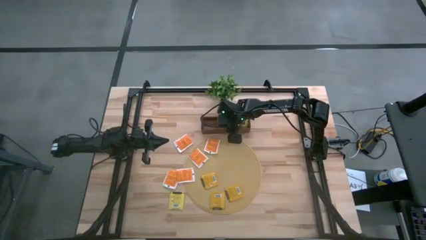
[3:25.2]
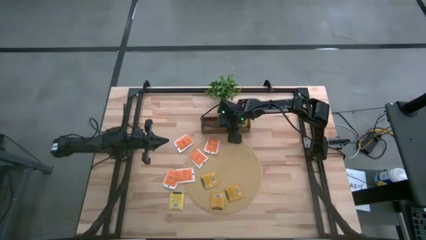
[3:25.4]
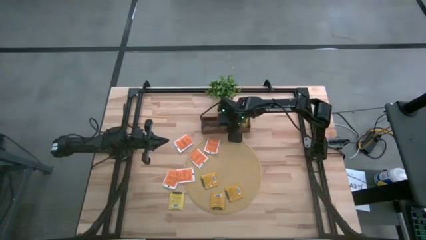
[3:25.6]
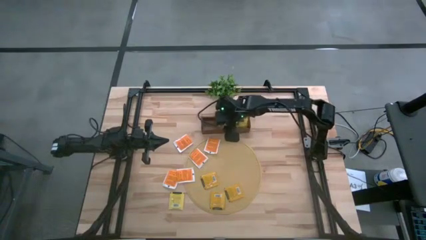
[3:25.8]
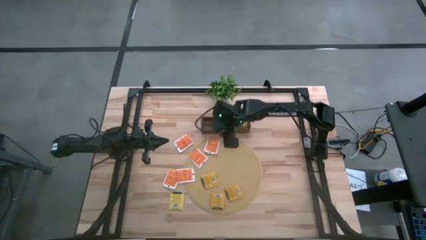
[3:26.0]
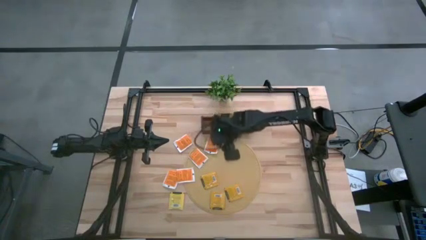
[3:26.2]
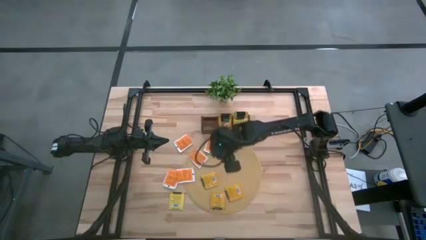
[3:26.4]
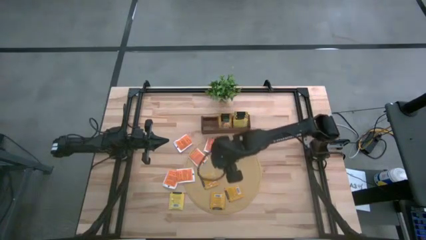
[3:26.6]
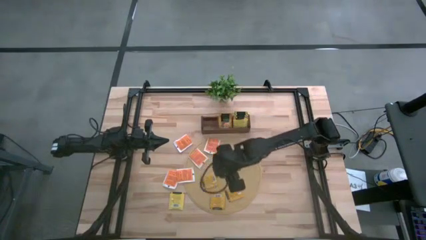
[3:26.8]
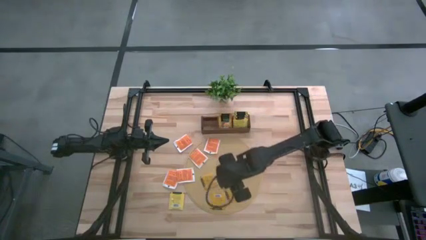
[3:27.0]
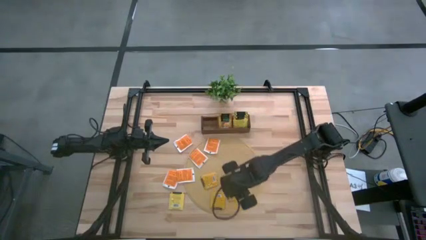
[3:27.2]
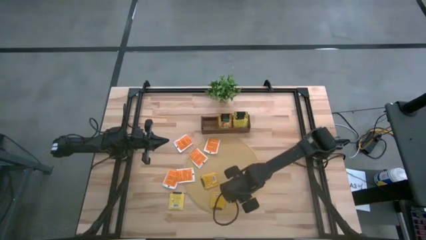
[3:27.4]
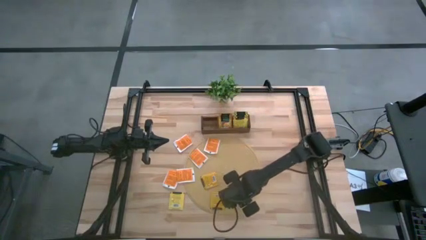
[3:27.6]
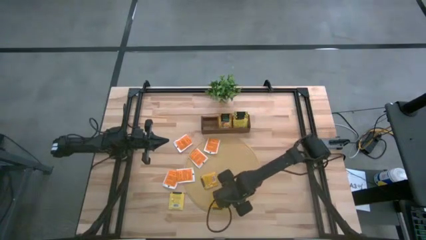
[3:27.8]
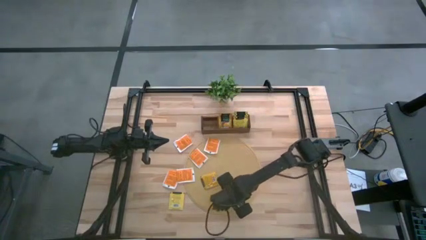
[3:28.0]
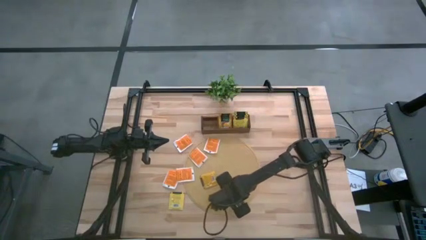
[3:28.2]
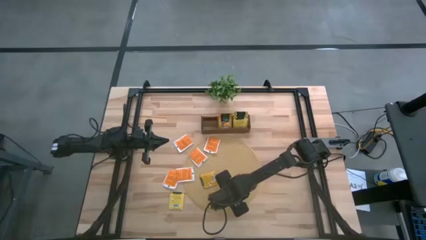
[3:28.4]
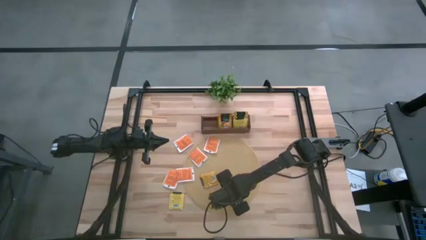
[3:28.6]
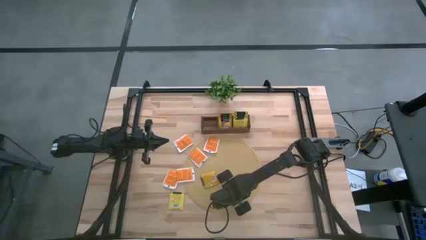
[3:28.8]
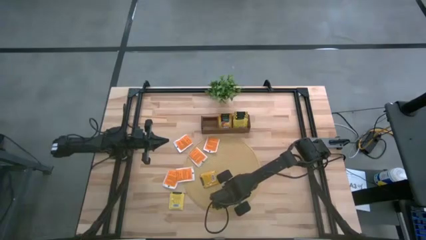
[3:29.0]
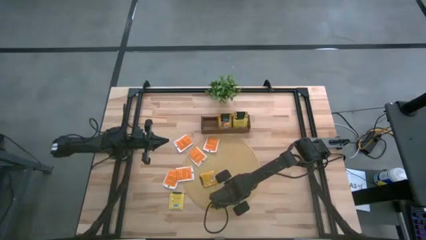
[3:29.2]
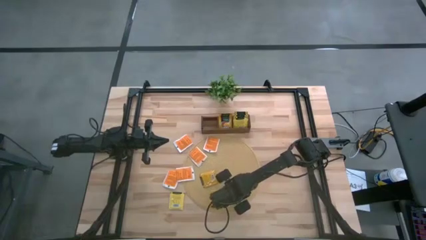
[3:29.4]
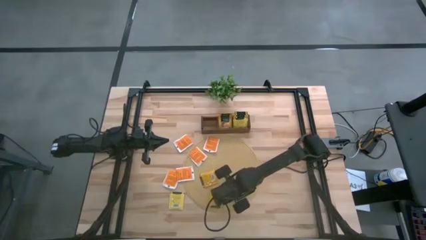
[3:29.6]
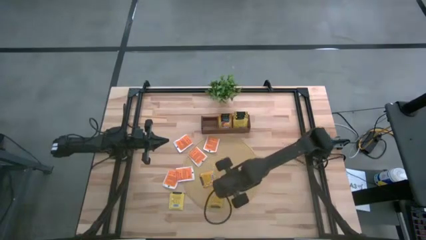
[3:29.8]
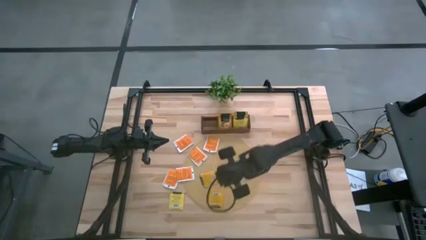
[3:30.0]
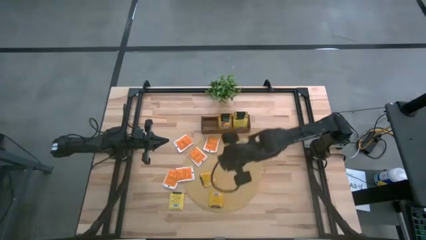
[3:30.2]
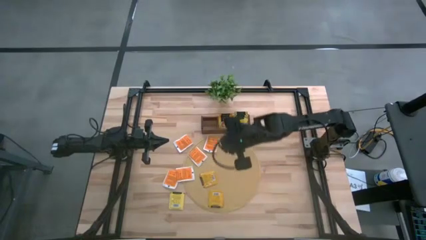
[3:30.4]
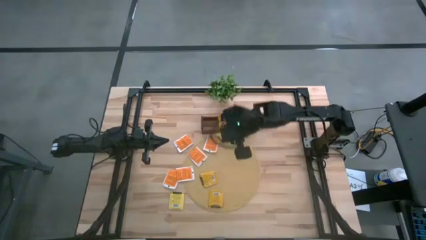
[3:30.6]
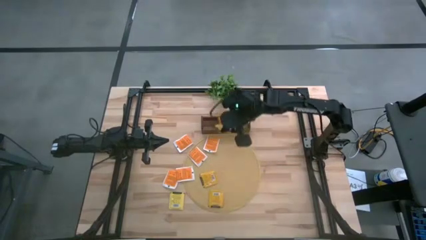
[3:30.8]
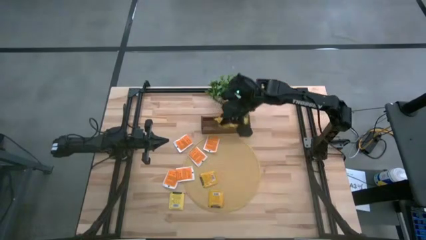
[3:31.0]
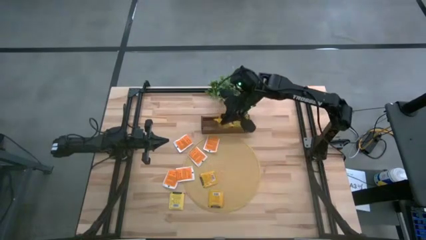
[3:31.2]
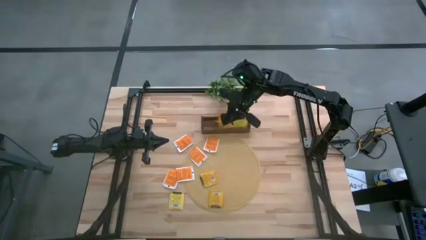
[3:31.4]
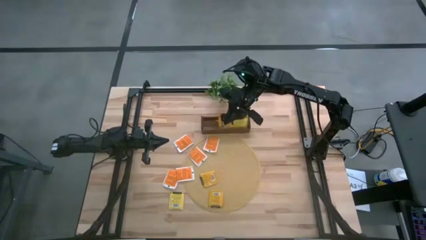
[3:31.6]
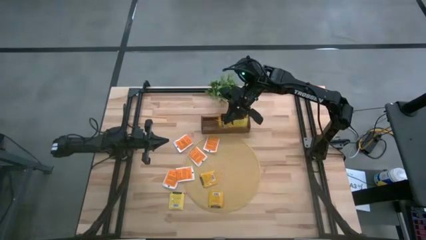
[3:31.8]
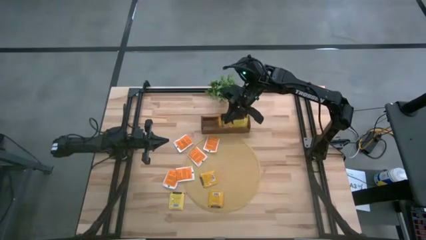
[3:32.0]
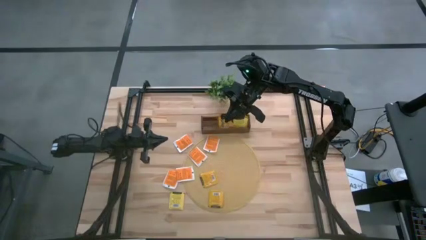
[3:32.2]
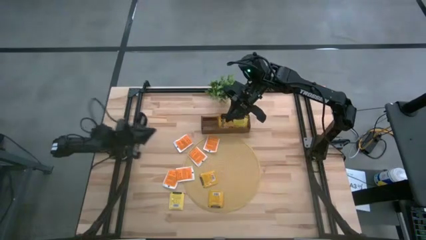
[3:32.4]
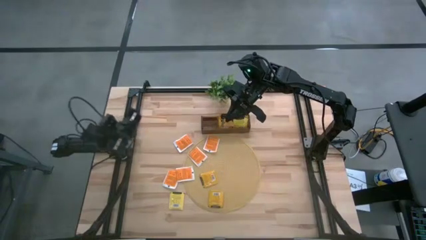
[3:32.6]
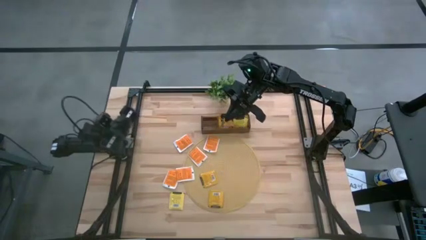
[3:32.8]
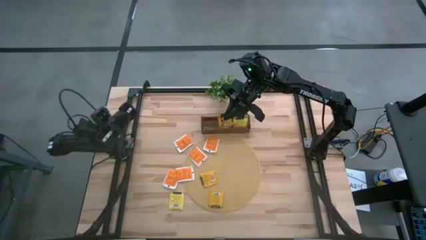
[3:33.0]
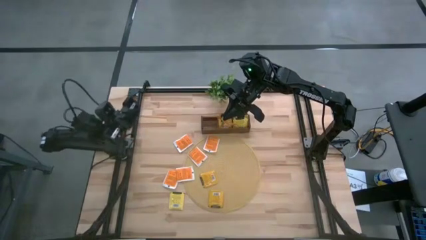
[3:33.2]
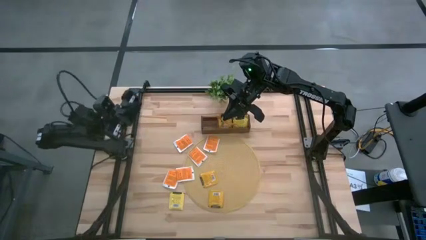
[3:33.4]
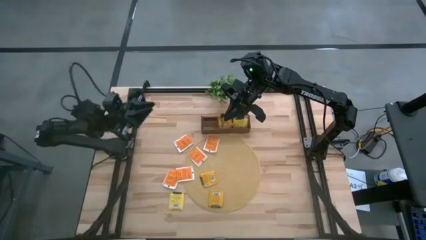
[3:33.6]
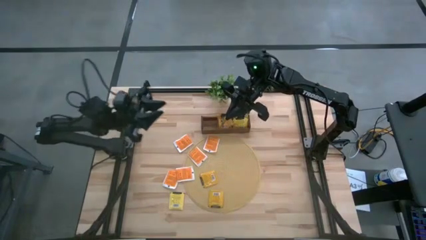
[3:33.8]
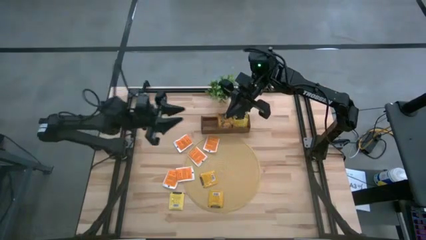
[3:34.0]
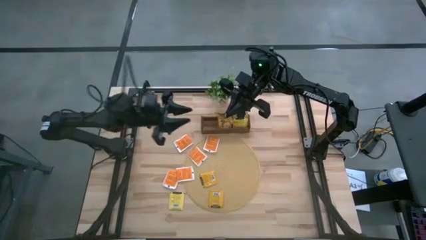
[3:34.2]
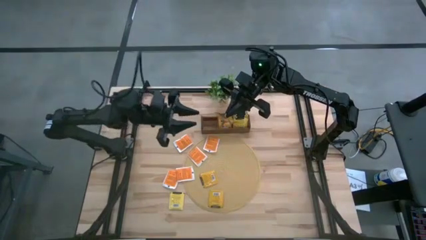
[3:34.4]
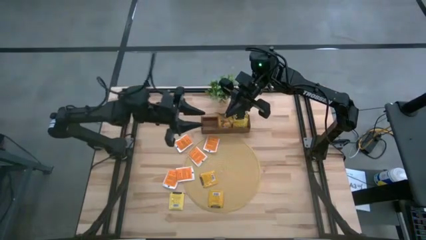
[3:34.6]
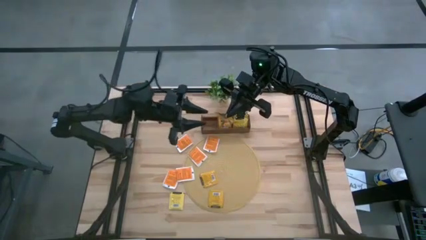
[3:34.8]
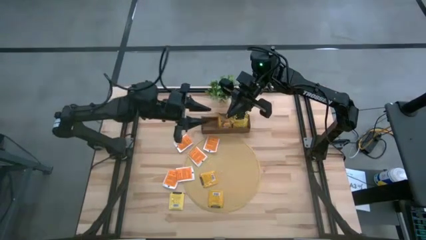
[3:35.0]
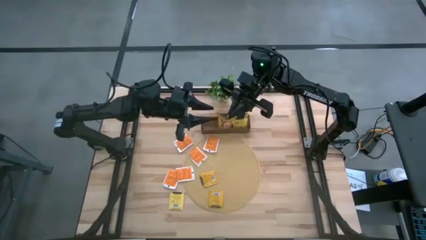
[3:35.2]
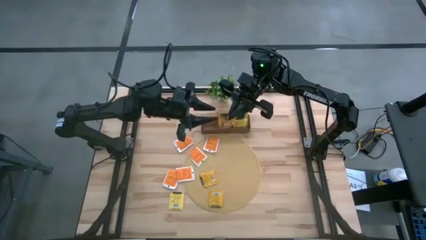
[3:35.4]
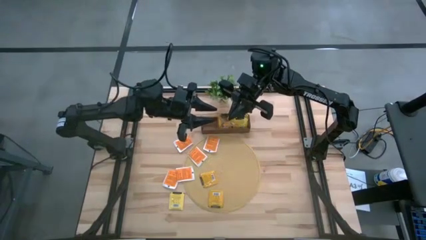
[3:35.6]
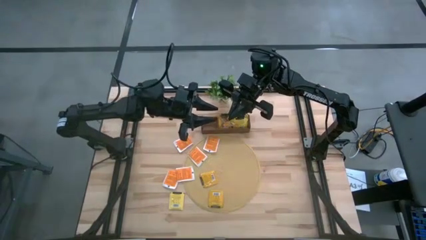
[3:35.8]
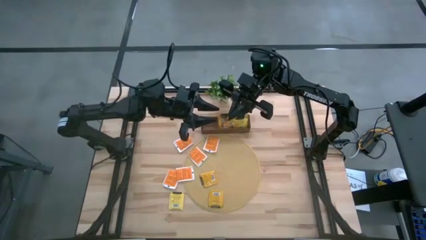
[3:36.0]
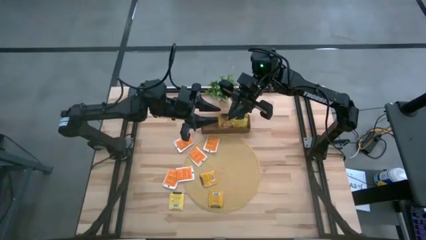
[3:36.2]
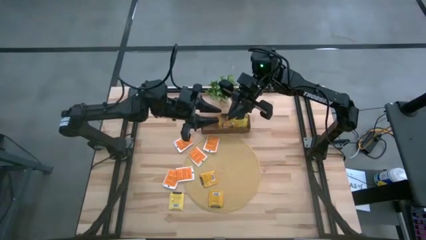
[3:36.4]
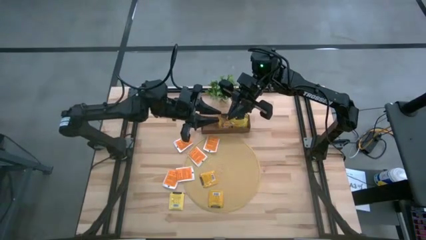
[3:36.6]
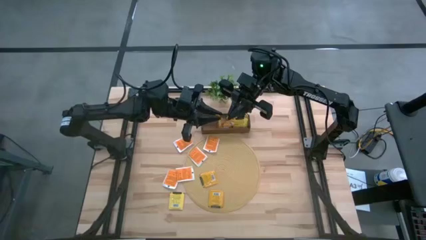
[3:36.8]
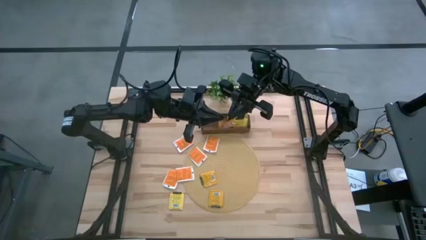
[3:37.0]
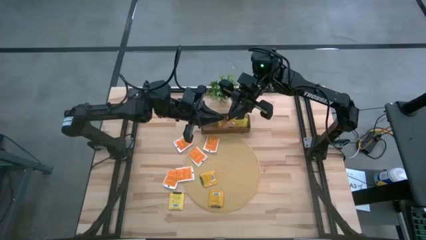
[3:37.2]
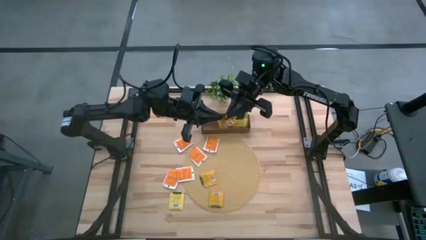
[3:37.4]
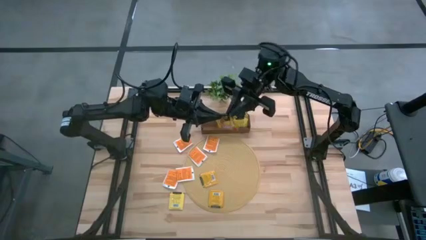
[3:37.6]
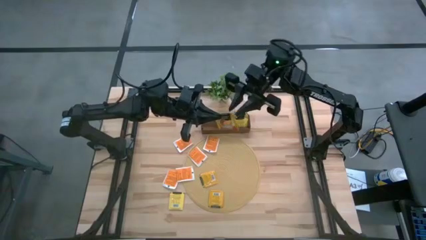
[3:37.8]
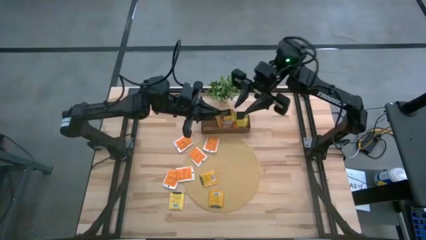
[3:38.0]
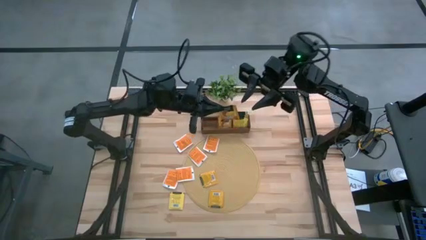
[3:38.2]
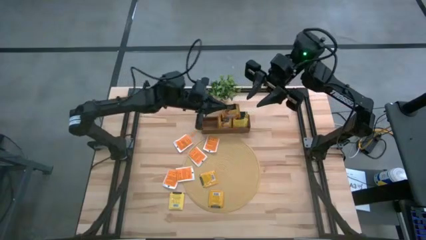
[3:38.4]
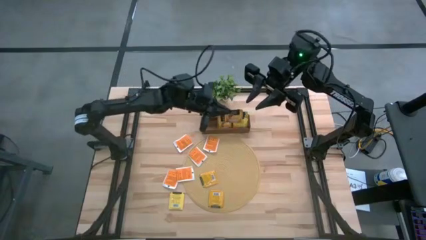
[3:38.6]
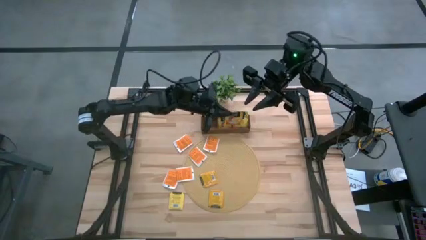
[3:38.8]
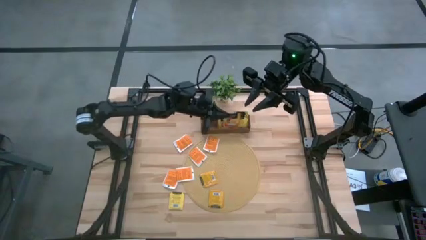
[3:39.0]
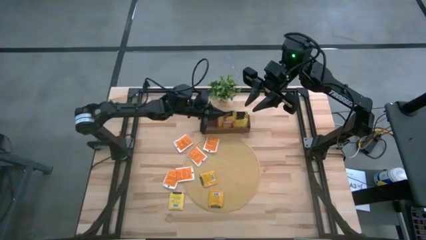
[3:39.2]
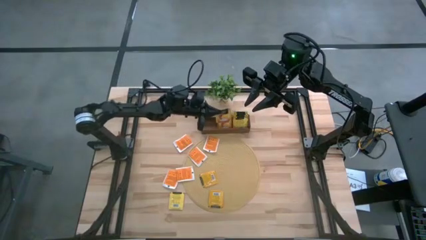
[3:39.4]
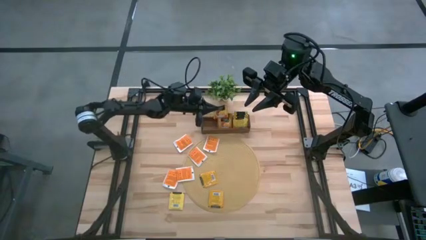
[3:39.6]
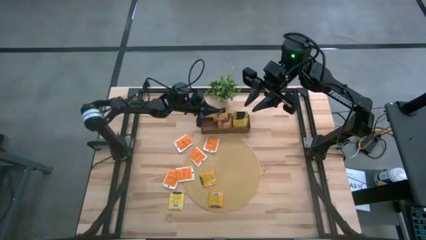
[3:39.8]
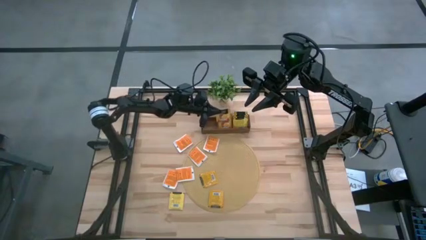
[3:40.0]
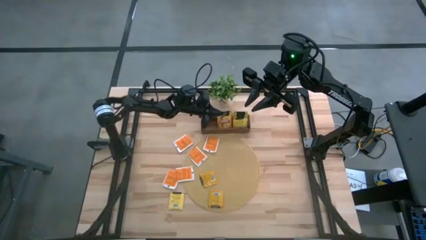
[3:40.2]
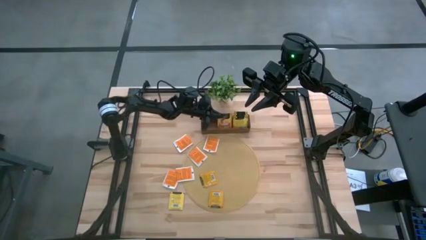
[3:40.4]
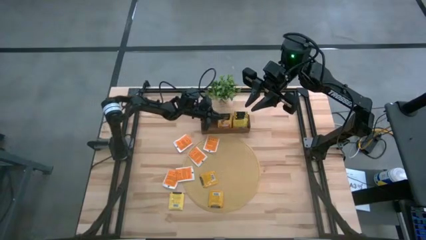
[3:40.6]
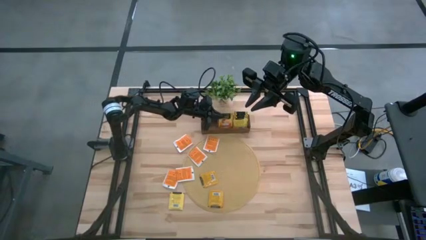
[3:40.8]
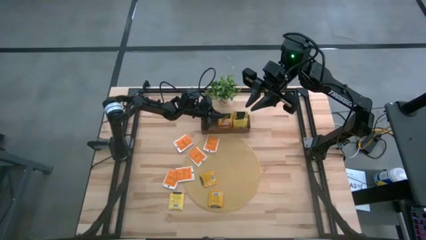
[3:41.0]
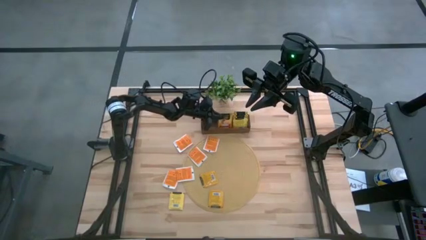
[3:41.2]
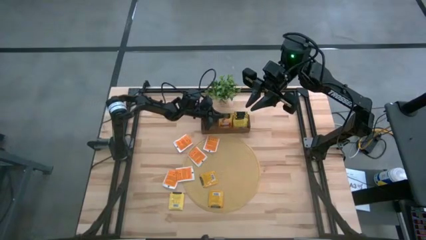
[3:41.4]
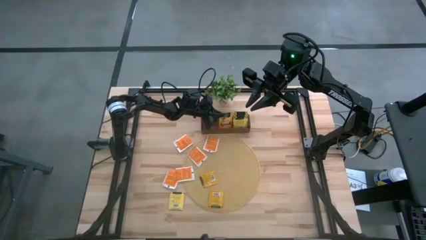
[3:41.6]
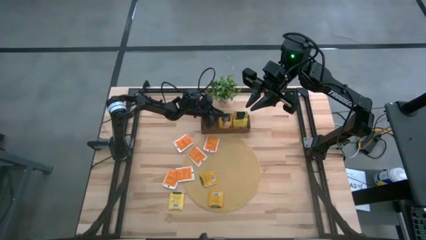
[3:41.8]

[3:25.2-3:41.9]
Task: Pick & Place Tea
Put the orange tea bag into the middle section of the wooden organizer
